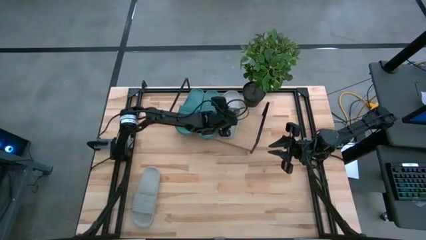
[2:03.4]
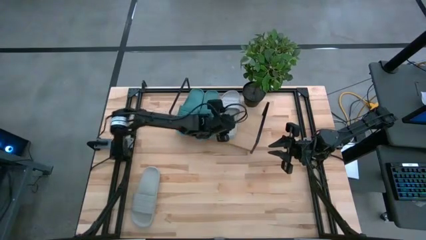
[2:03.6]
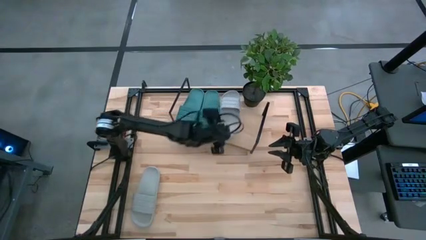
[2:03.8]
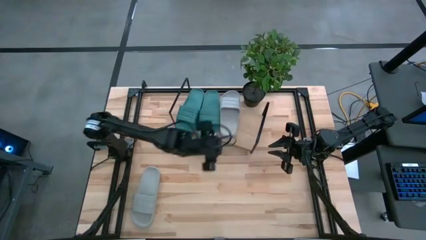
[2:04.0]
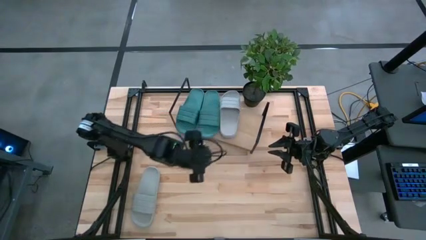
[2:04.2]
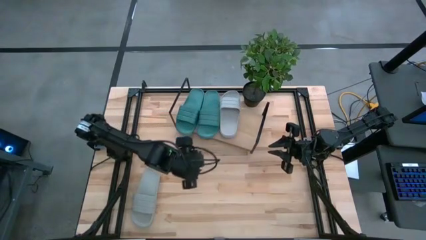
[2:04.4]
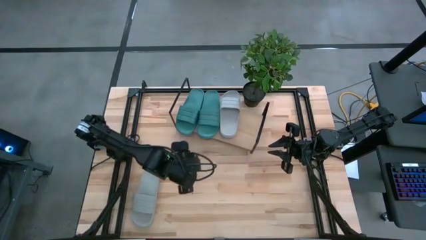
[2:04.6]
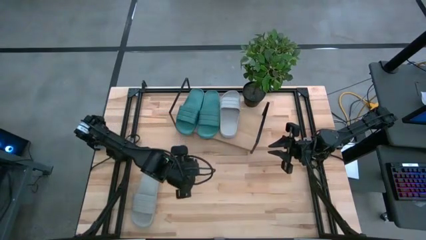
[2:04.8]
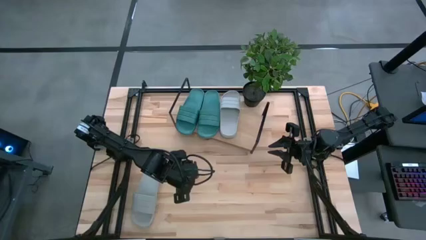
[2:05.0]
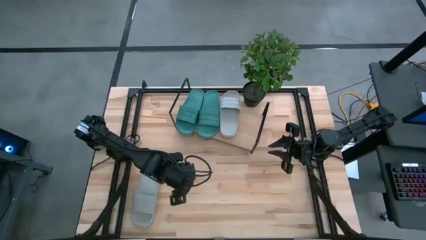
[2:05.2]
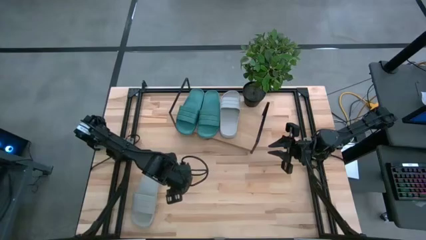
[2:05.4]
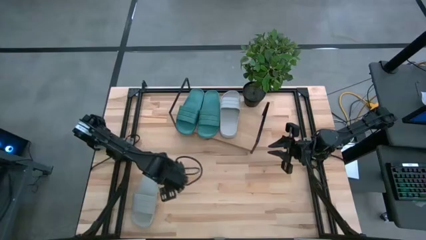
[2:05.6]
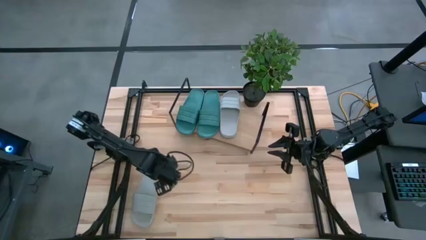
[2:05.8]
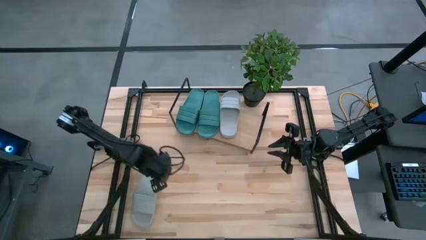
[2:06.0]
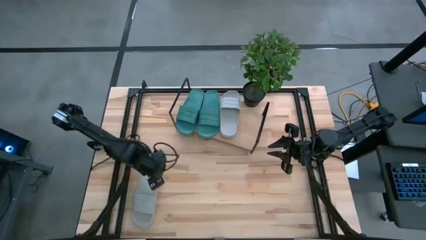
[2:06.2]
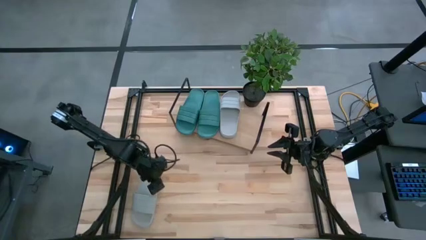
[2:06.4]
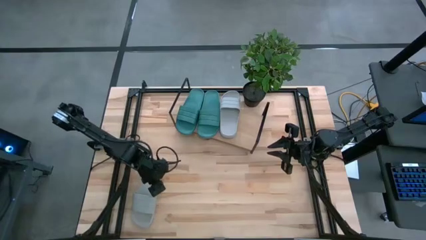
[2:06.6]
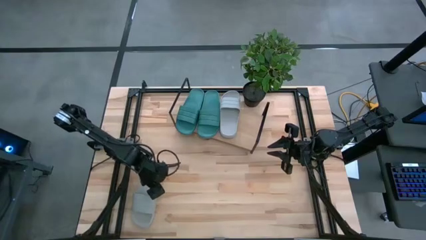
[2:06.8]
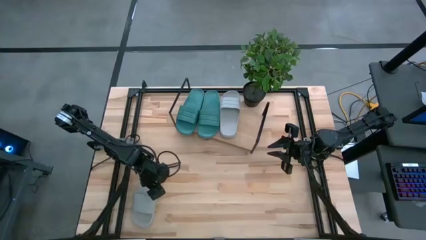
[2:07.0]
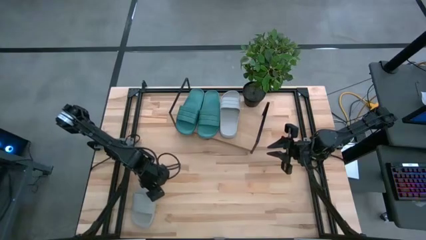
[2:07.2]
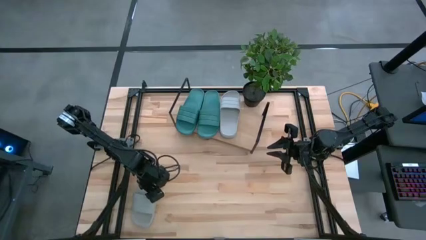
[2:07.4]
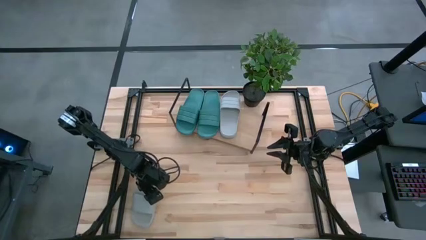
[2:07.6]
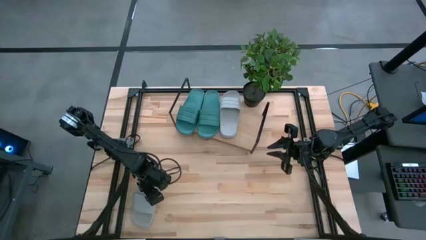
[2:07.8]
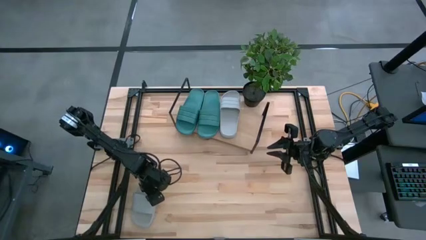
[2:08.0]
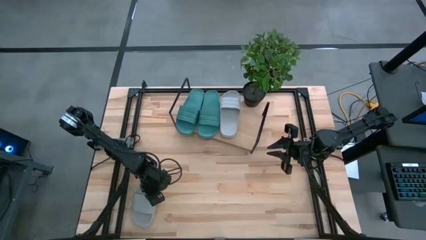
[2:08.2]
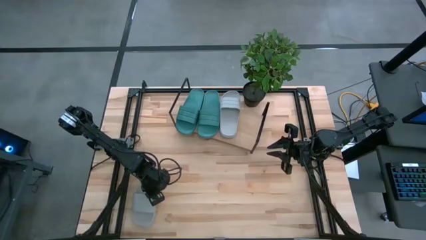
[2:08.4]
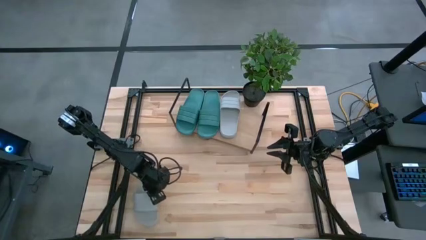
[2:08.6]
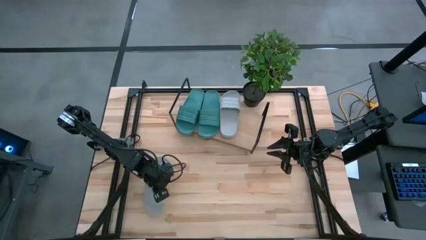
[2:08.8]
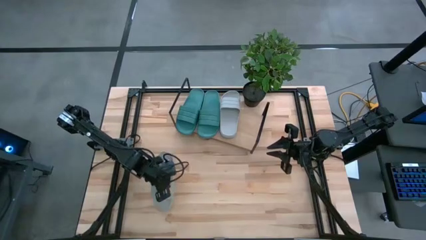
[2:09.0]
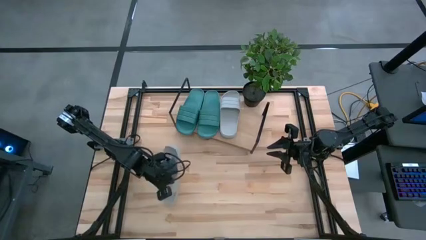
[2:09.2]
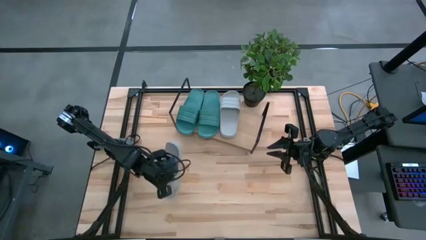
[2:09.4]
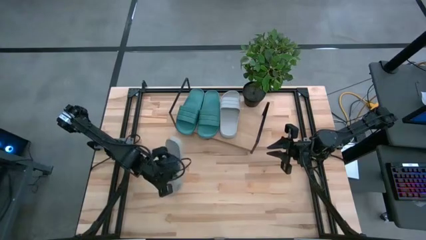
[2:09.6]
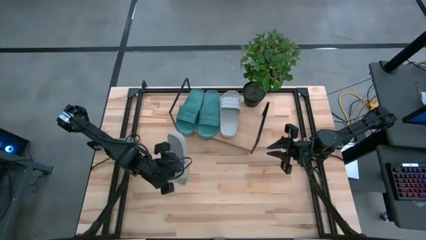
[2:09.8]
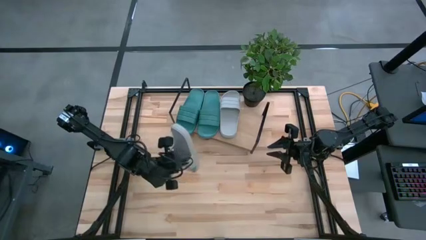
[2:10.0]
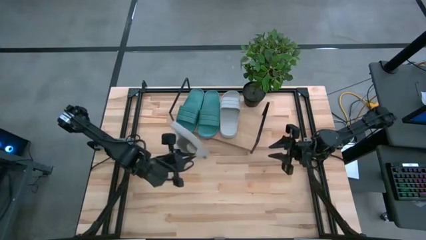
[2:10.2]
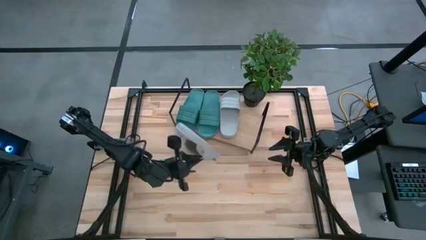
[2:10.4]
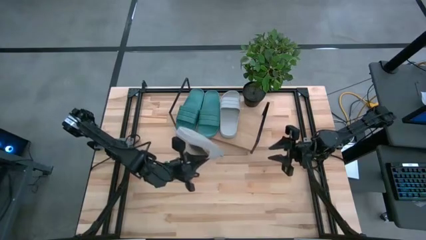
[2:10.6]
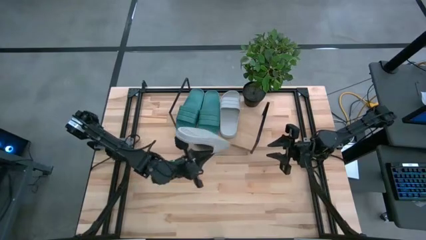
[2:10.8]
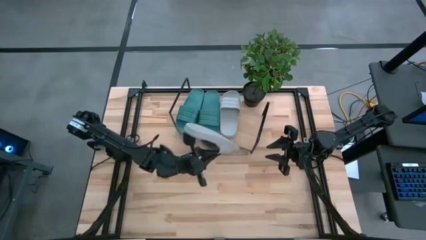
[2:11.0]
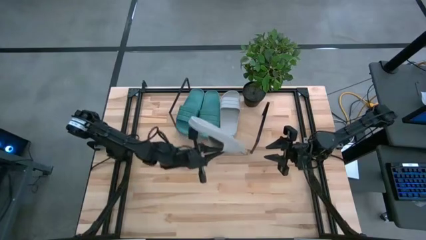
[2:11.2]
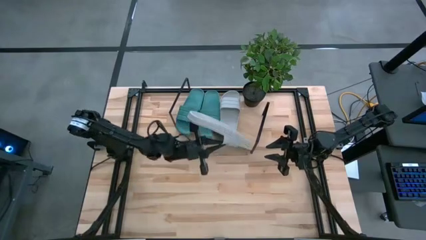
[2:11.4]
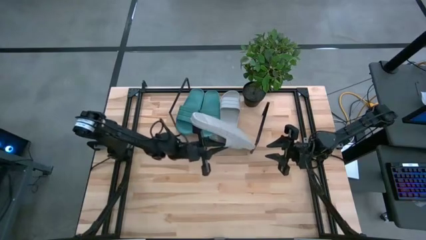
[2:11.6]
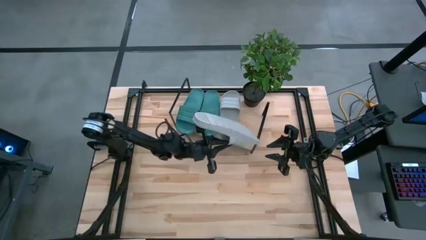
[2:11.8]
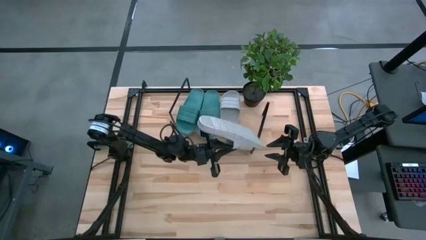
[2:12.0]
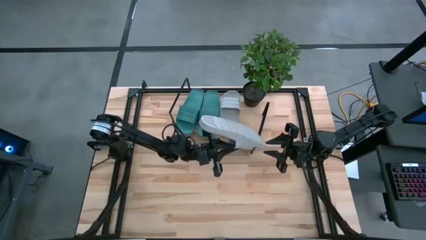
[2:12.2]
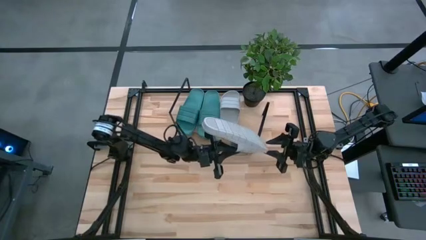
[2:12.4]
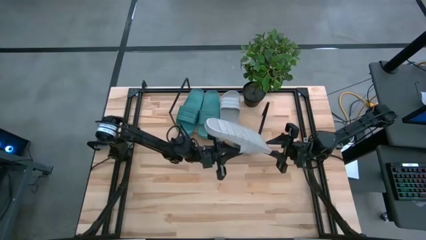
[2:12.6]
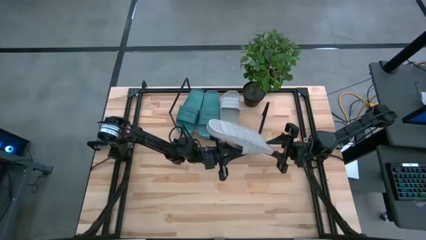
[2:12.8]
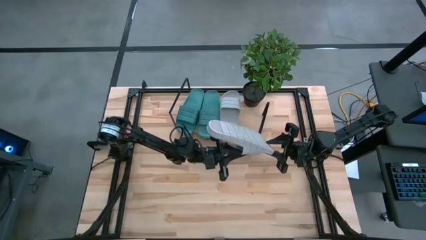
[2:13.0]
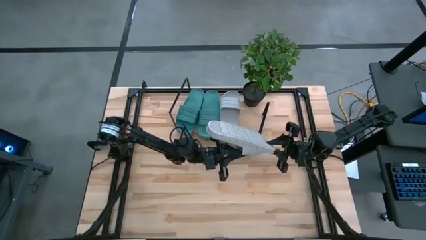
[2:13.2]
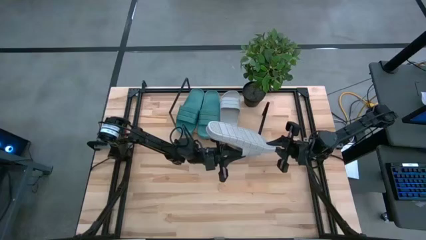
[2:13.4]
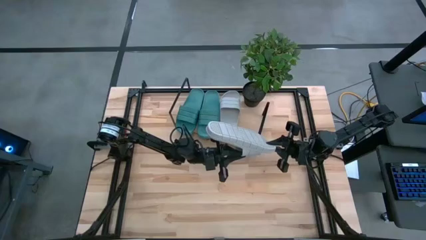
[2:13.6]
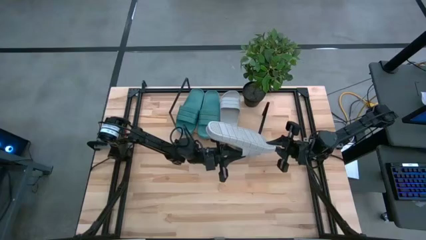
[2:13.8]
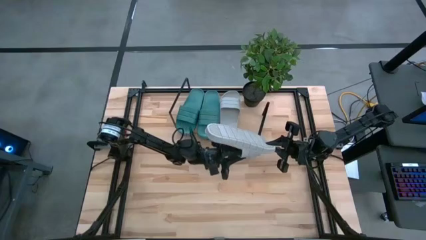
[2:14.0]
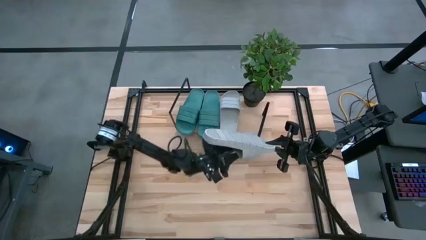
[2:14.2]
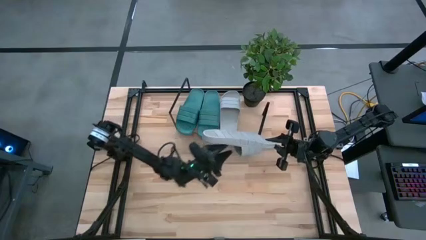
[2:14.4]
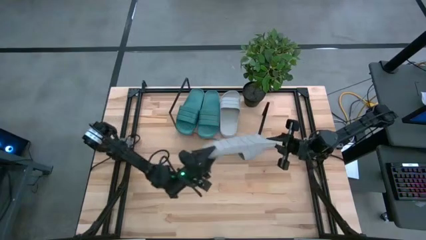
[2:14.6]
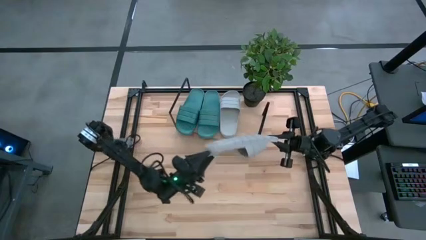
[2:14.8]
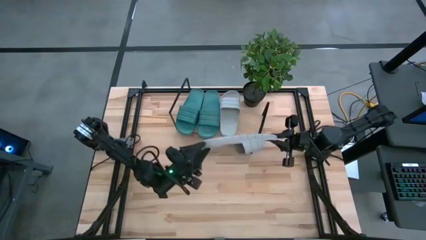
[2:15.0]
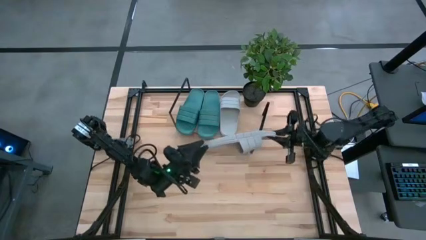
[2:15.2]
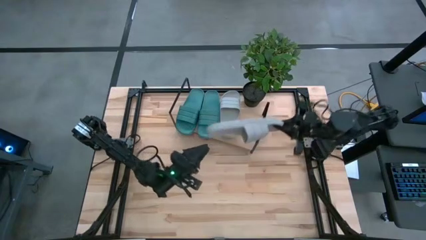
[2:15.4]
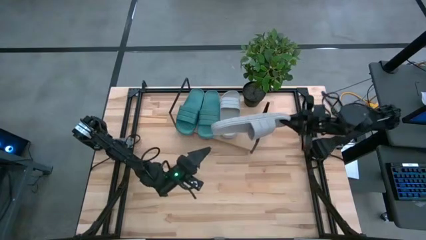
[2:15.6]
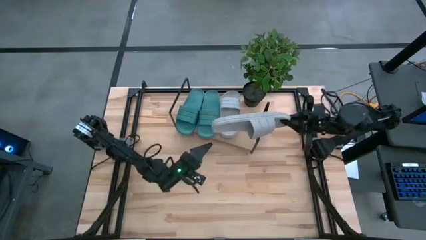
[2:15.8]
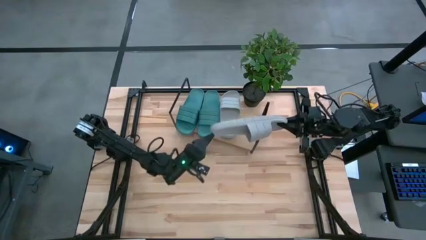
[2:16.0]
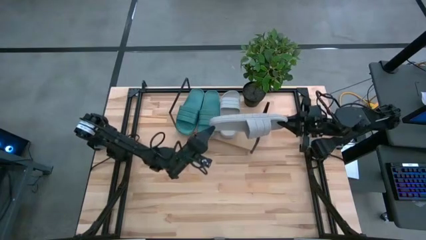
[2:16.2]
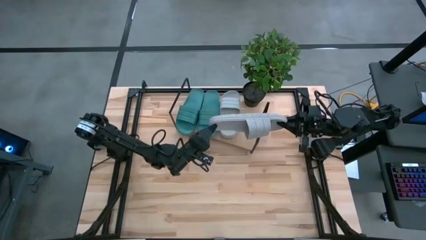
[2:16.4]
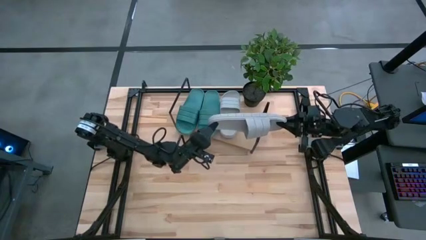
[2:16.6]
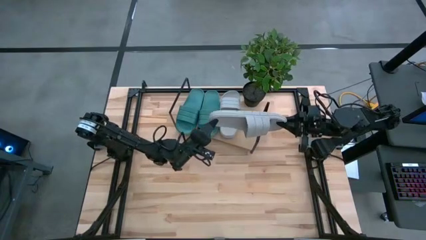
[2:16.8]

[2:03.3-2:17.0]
Task: Pick and place slides into the shelf
Put the gray slipper on the shelf
